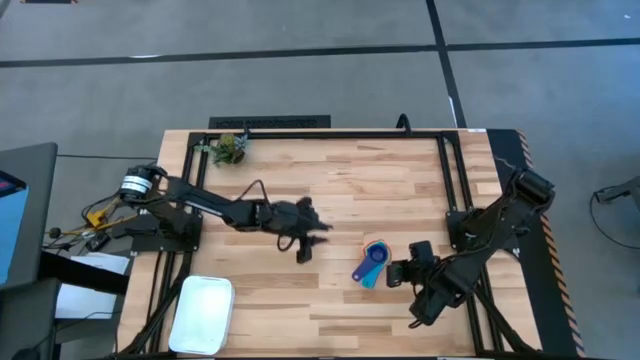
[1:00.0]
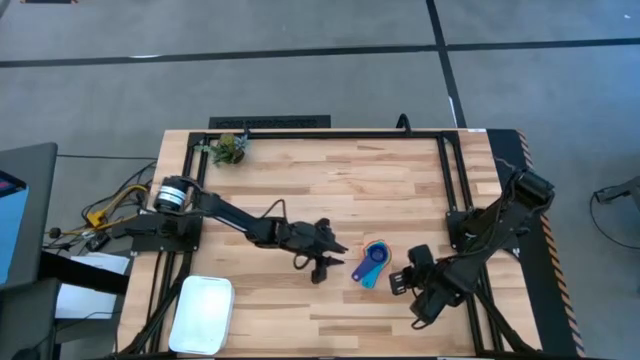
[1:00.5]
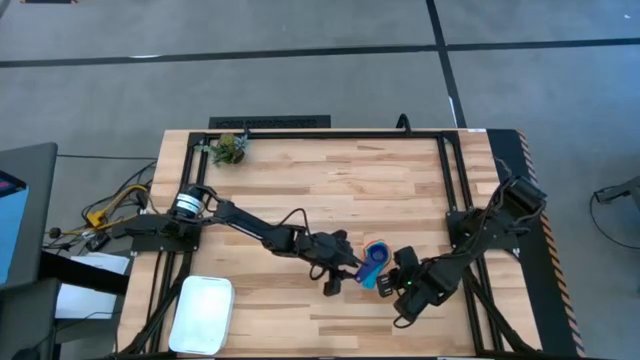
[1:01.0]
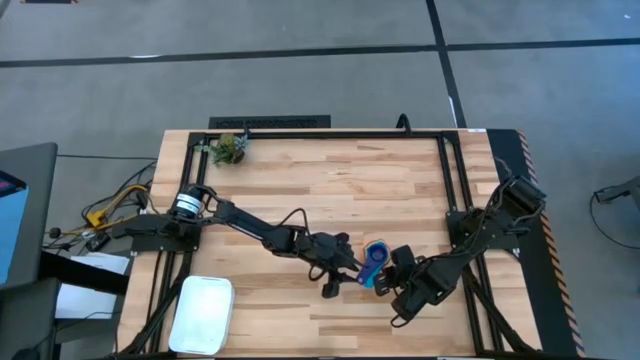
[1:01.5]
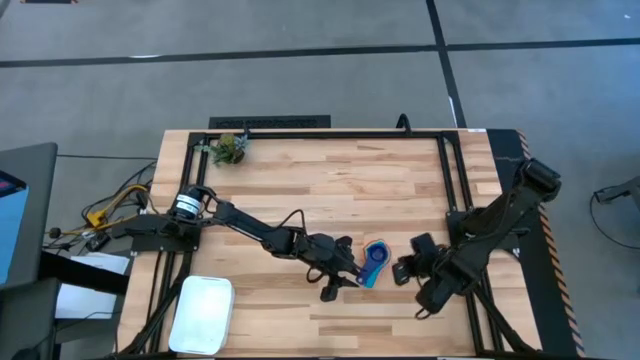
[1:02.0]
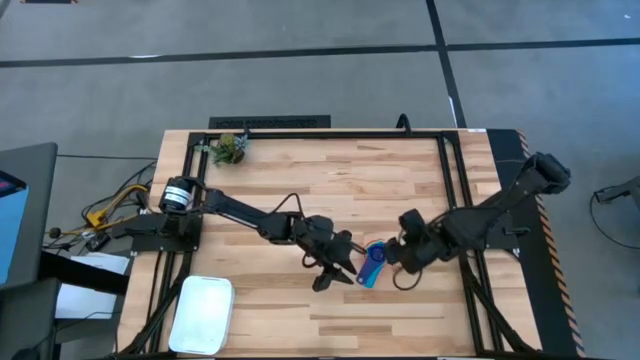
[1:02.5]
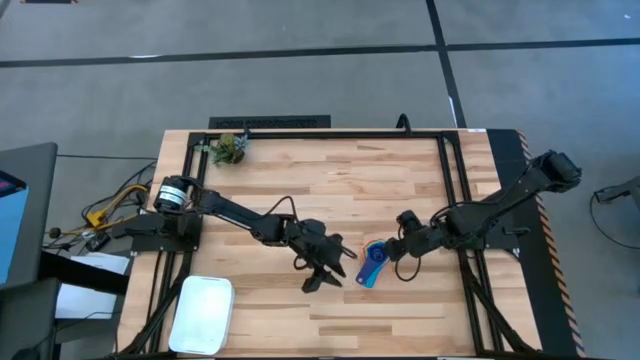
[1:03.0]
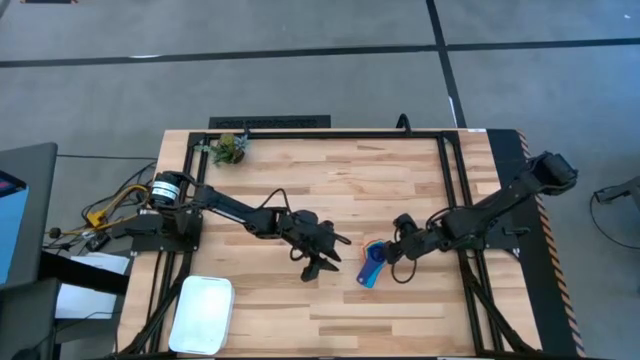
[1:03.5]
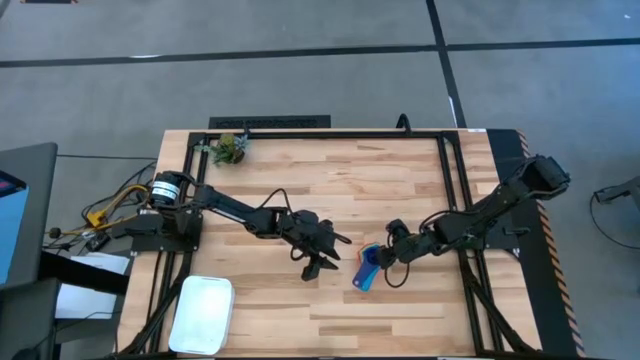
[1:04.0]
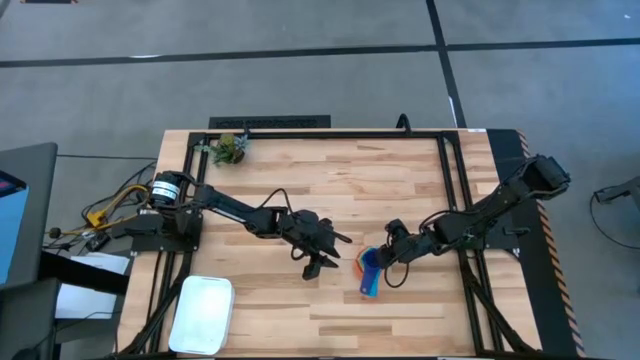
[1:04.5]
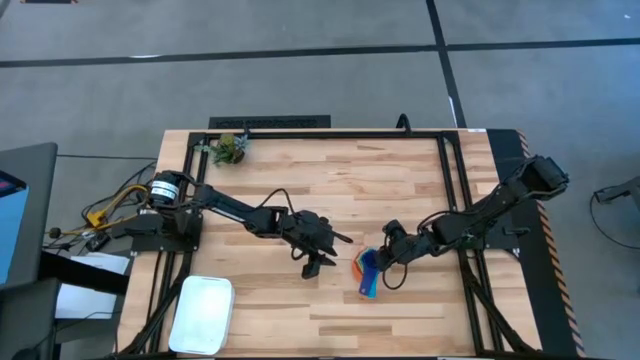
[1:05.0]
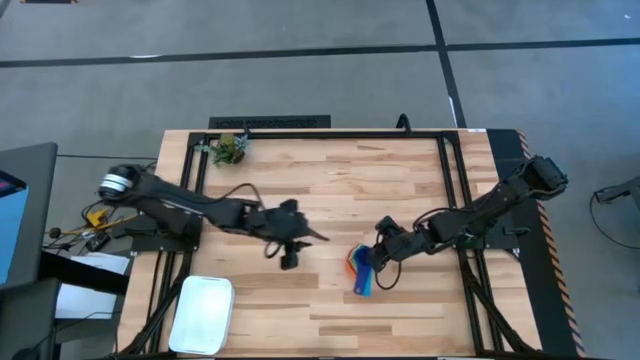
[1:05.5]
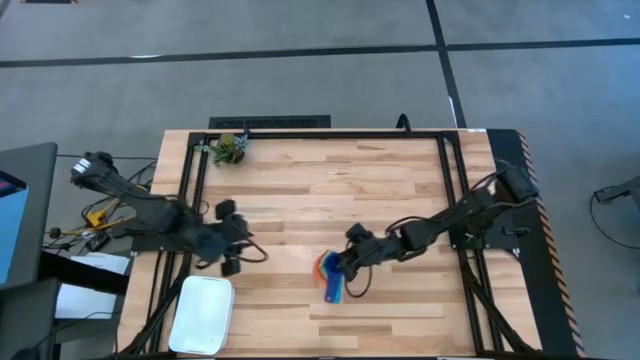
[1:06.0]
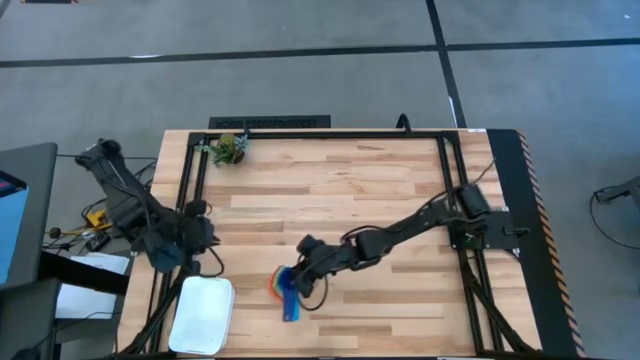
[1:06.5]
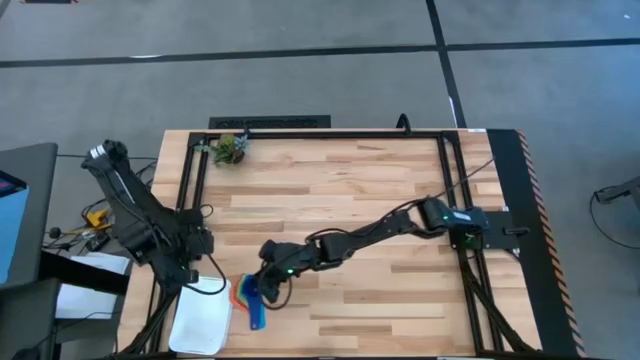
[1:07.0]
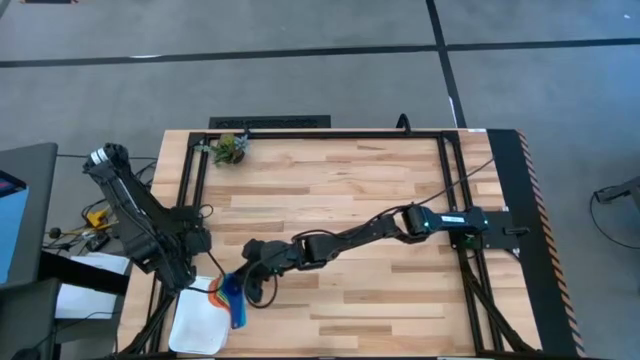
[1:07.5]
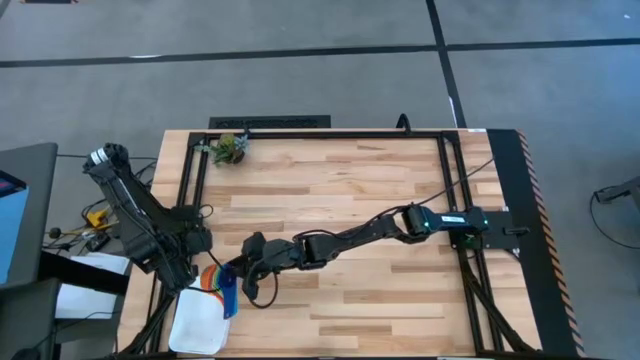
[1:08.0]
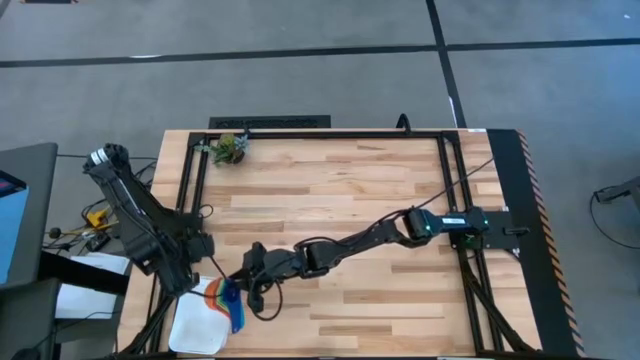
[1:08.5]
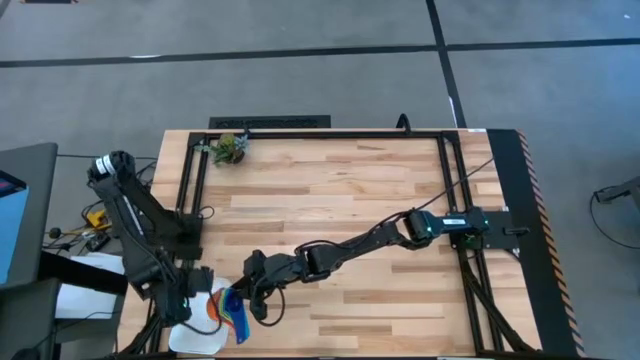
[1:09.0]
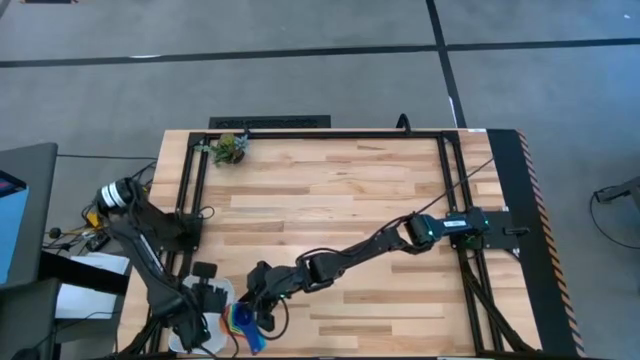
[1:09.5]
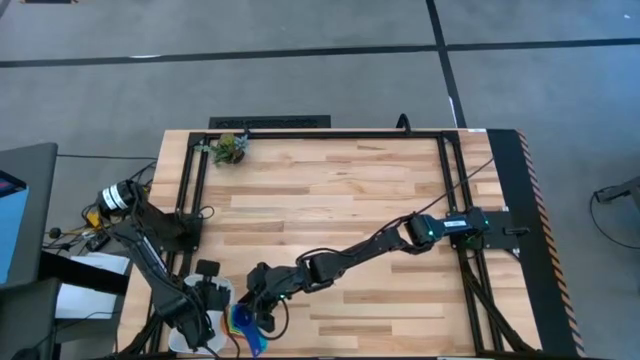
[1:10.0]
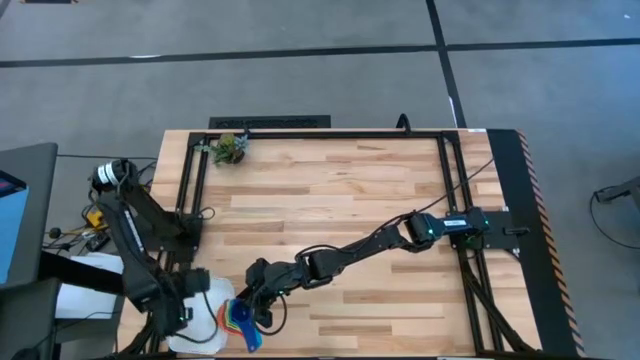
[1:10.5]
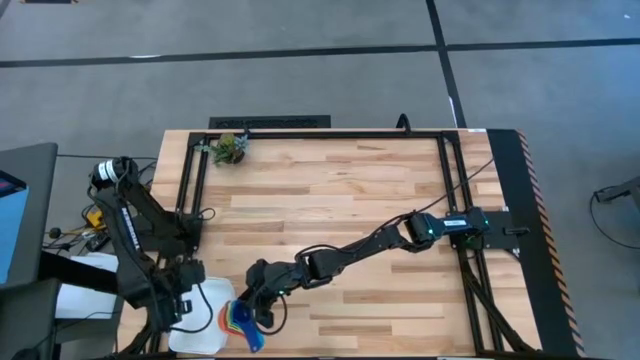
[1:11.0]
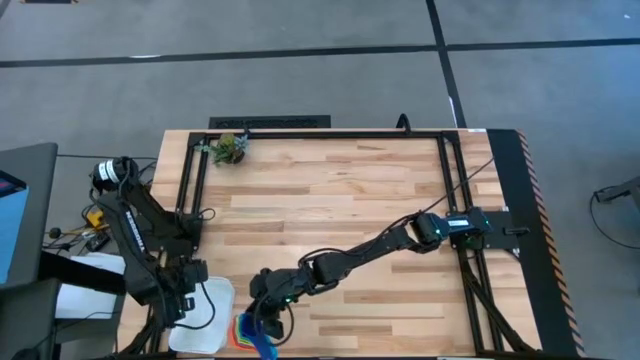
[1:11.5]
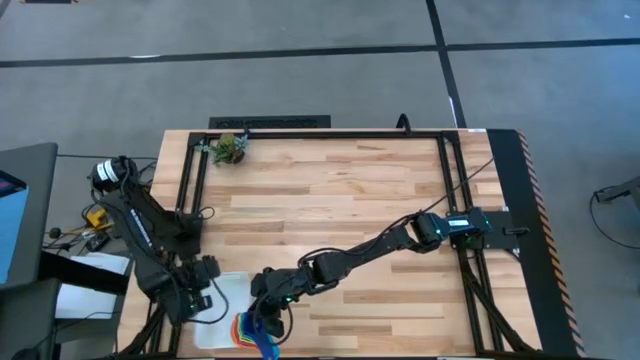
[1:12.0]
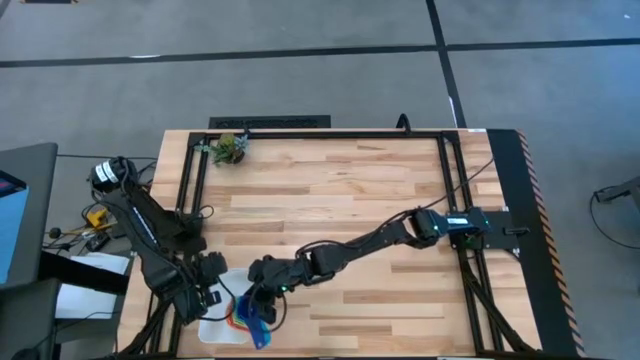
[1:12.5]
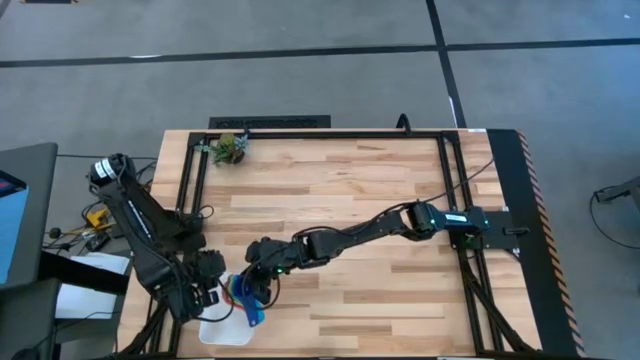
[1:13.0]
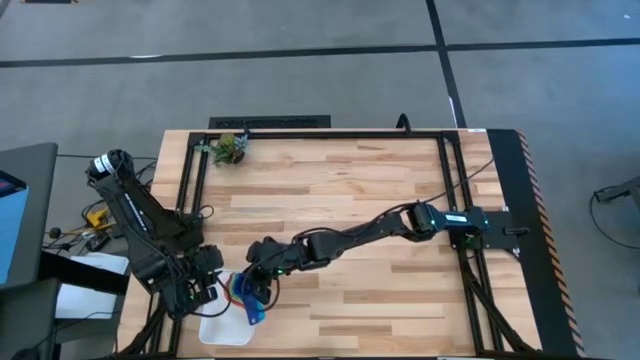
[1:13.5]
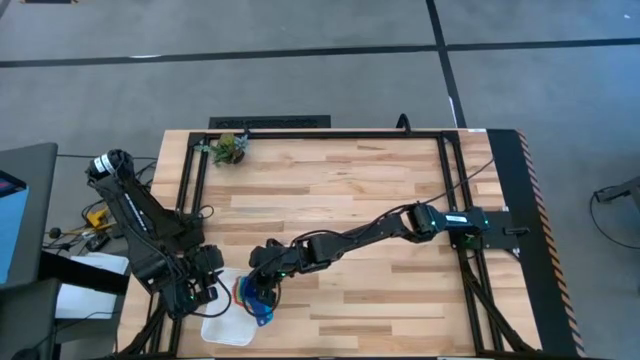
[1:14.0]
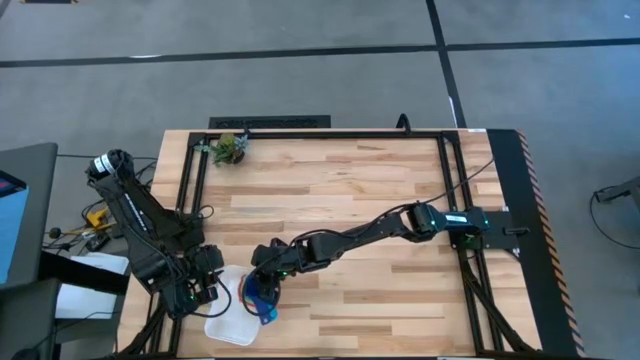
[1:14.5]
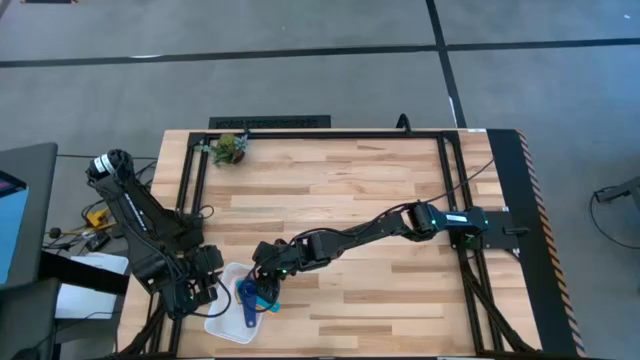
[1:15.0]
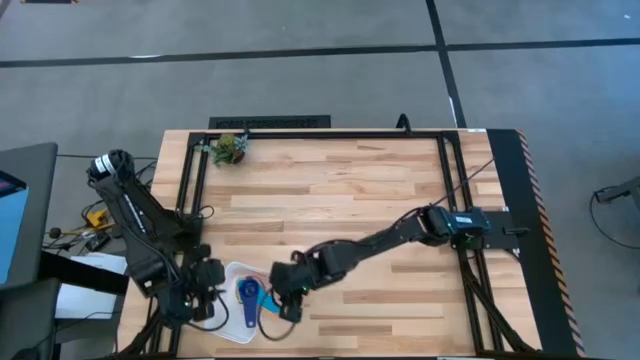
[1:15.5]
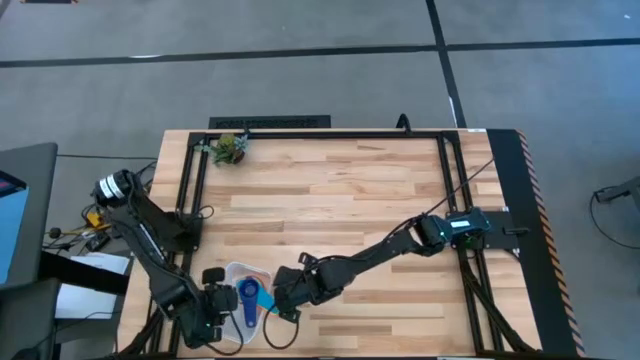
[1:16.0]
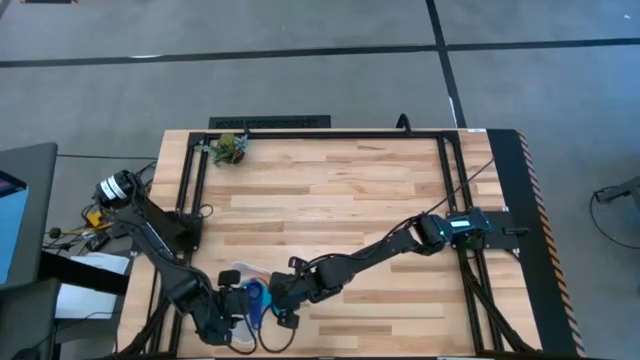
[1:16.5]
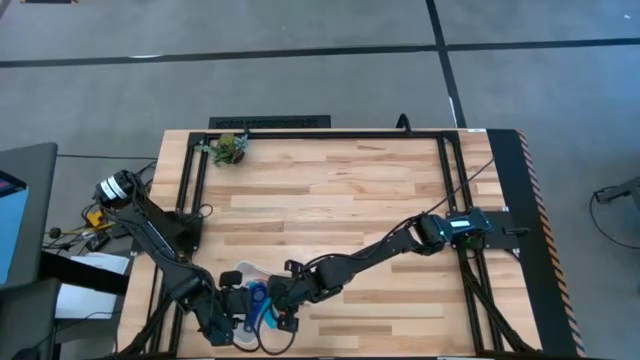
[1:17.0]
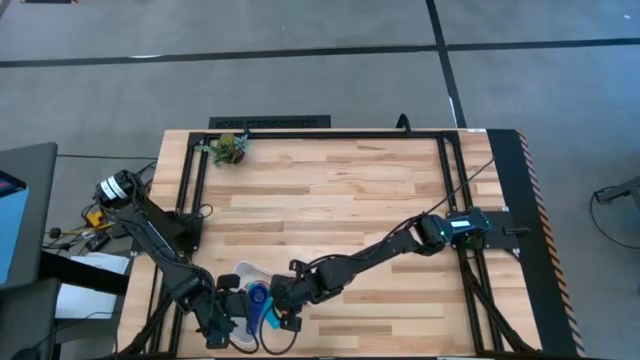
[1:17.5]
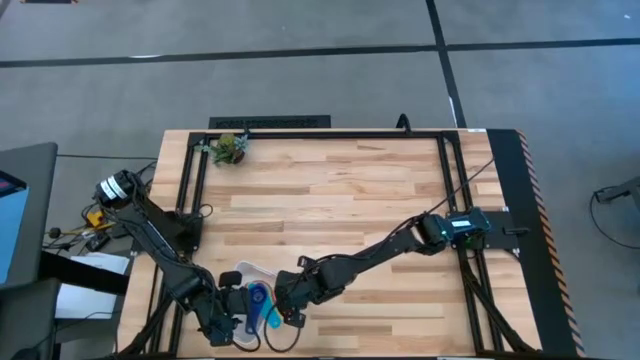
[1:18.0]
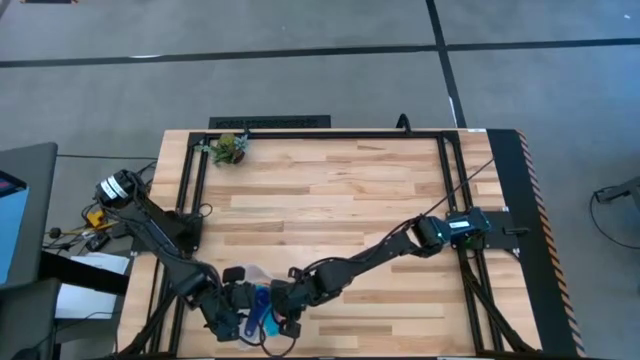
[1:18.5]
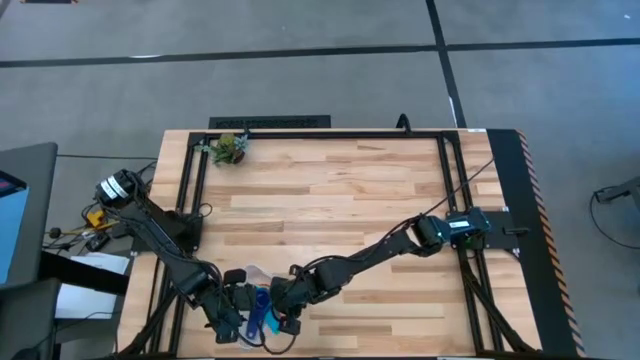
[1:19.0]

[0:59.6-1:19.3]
Task: Nest measuring cups in basket
Put the nested measuring cups into the white bin

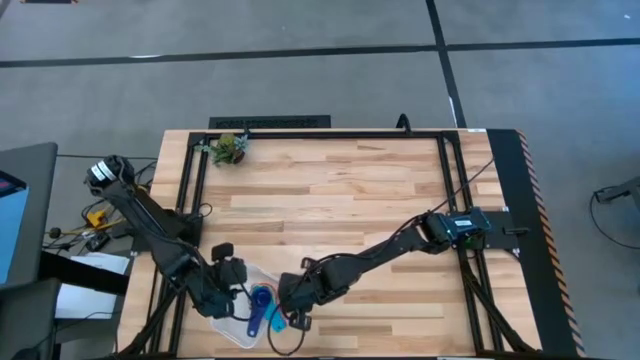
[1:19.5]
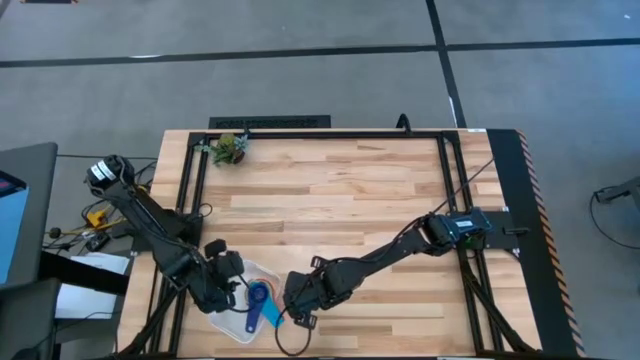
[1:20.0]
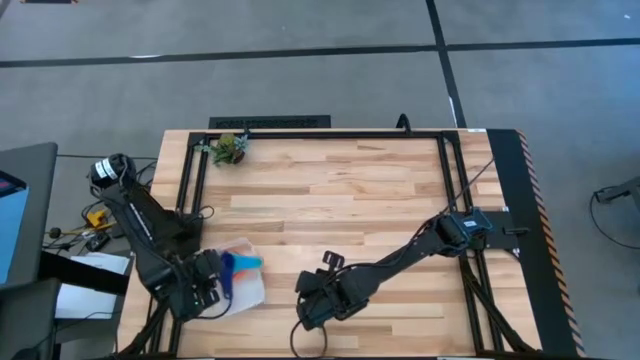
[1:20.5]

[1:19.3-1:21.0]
Adjust the white bin
